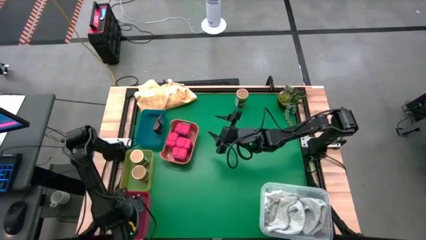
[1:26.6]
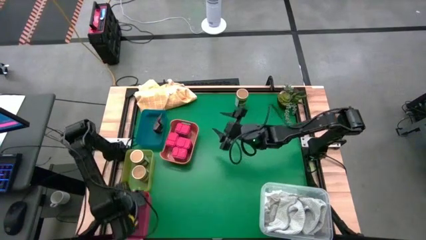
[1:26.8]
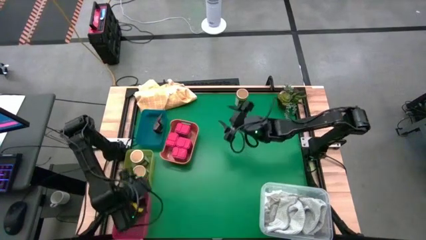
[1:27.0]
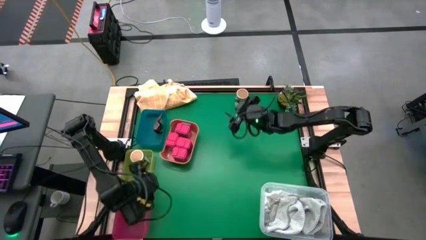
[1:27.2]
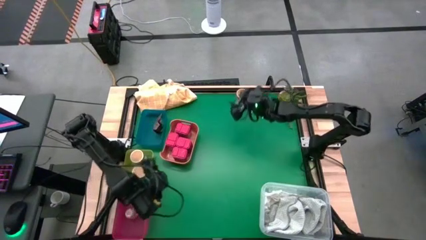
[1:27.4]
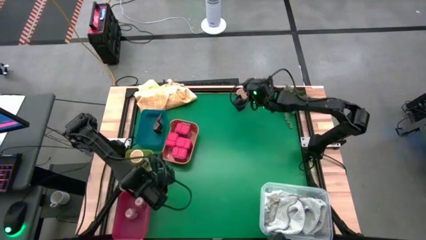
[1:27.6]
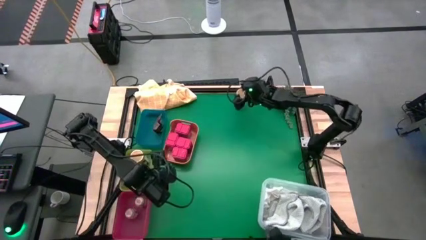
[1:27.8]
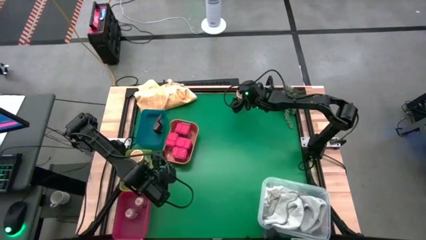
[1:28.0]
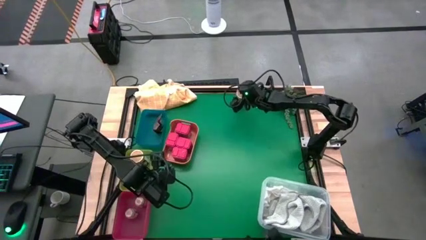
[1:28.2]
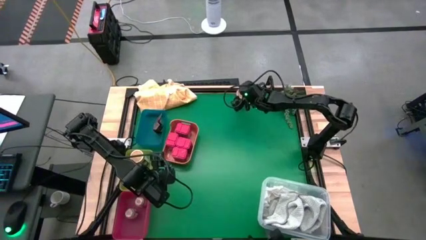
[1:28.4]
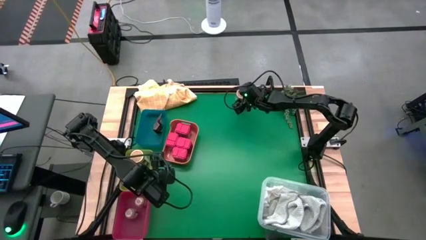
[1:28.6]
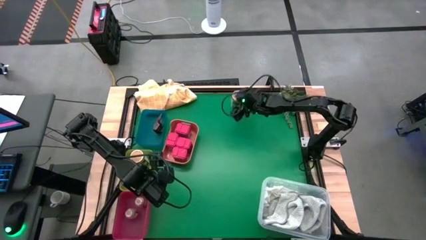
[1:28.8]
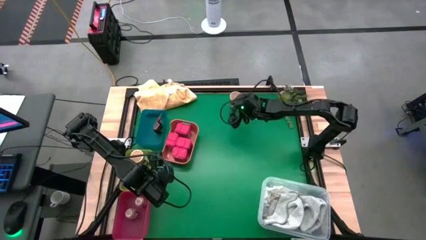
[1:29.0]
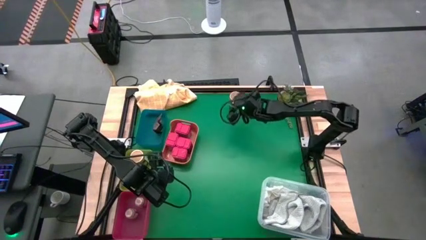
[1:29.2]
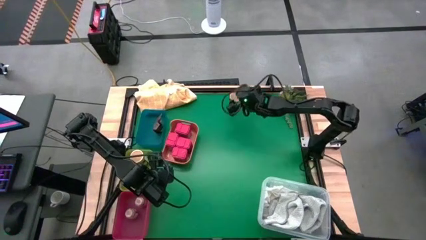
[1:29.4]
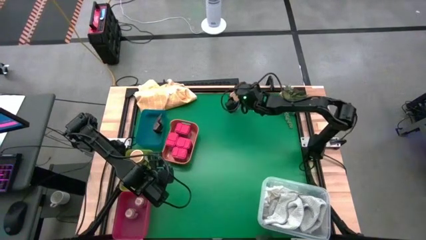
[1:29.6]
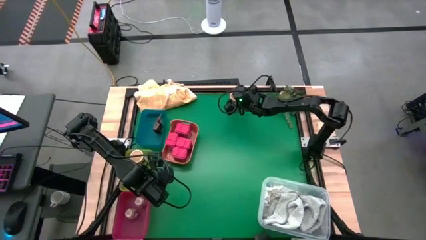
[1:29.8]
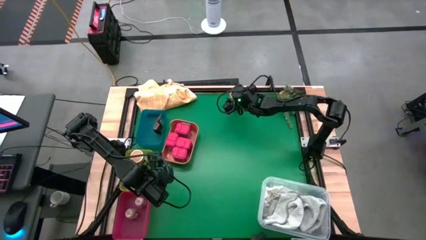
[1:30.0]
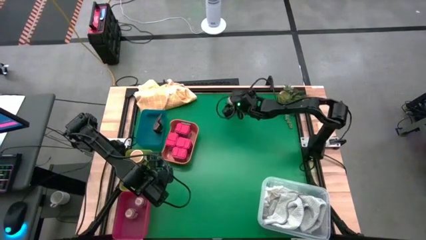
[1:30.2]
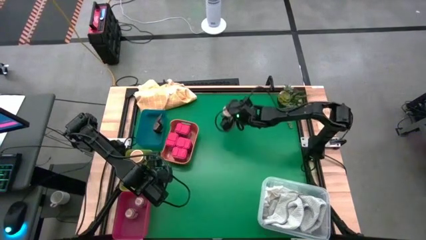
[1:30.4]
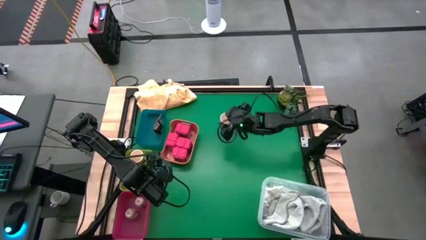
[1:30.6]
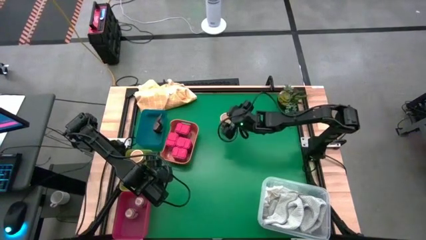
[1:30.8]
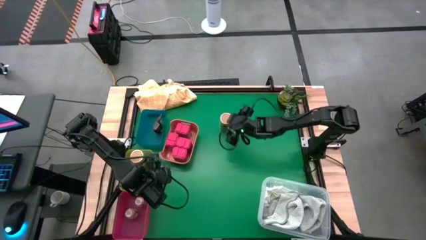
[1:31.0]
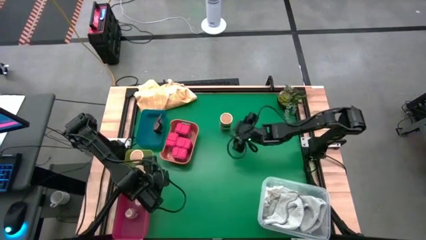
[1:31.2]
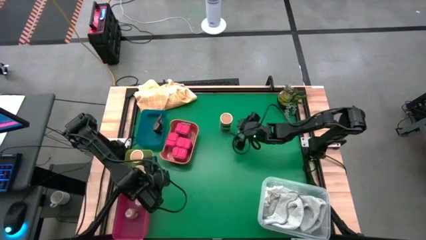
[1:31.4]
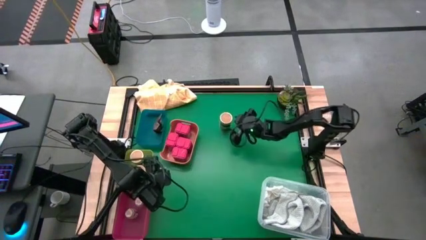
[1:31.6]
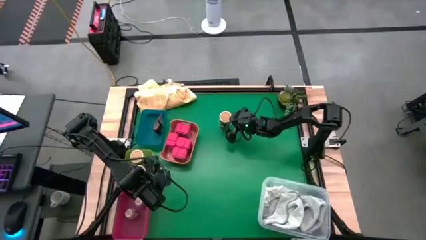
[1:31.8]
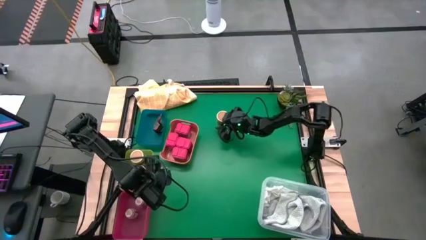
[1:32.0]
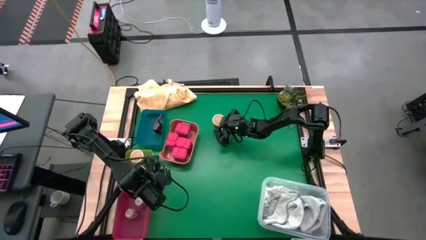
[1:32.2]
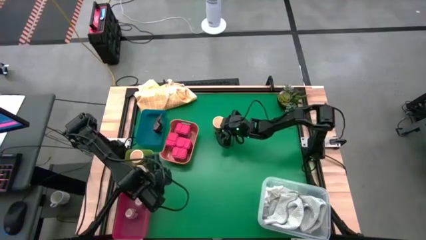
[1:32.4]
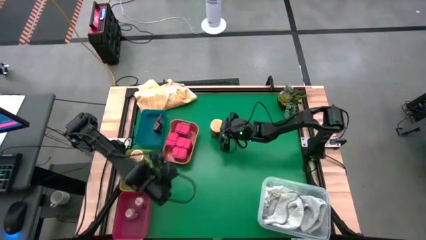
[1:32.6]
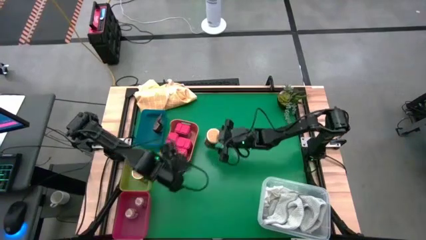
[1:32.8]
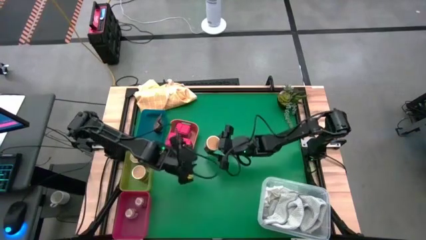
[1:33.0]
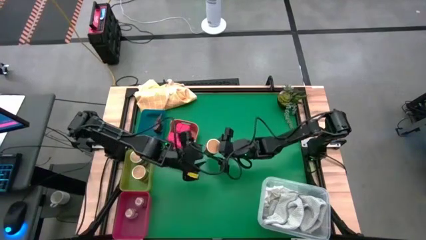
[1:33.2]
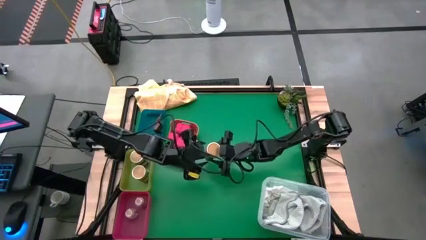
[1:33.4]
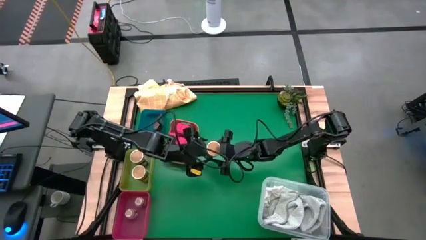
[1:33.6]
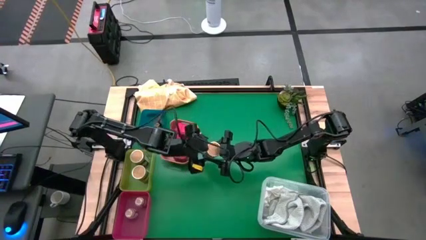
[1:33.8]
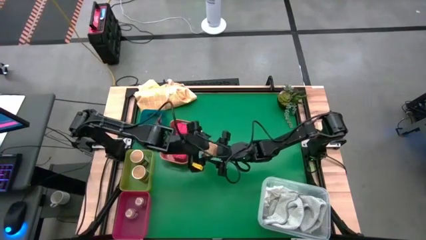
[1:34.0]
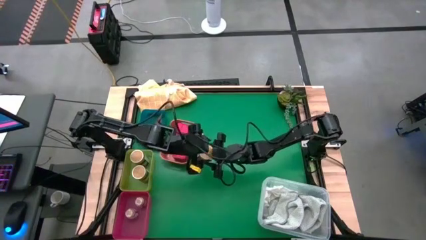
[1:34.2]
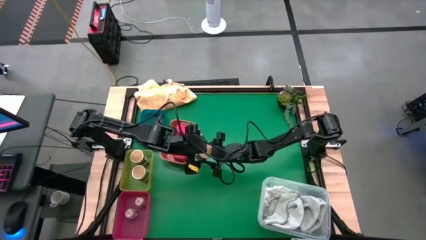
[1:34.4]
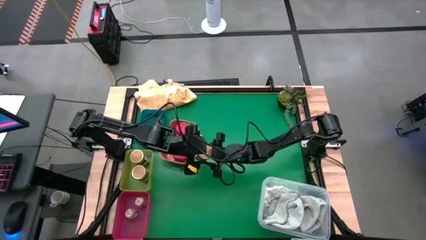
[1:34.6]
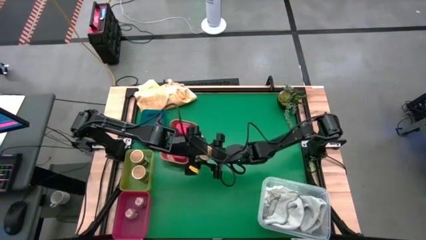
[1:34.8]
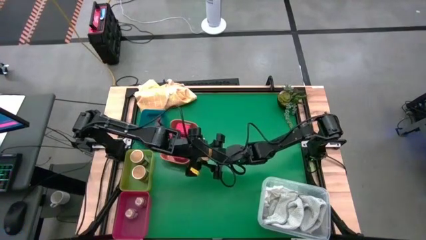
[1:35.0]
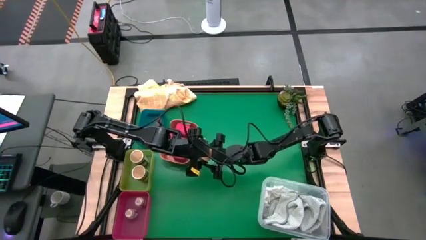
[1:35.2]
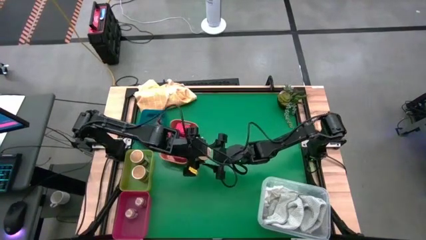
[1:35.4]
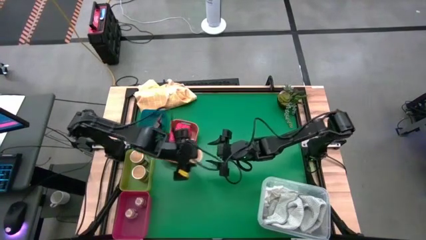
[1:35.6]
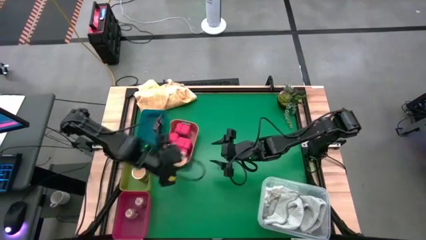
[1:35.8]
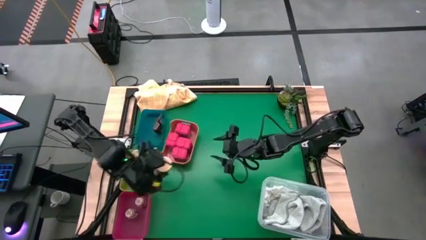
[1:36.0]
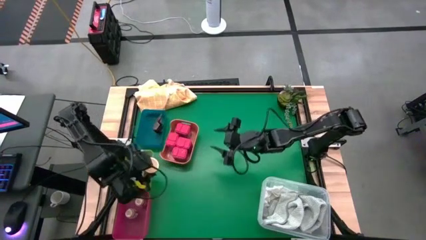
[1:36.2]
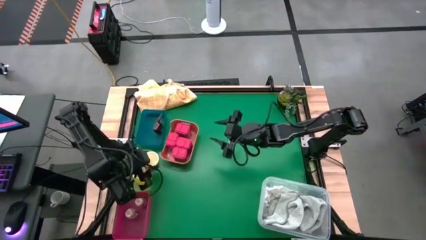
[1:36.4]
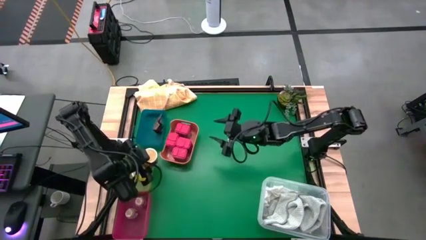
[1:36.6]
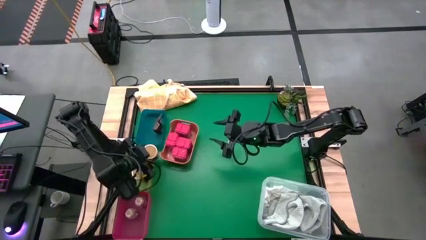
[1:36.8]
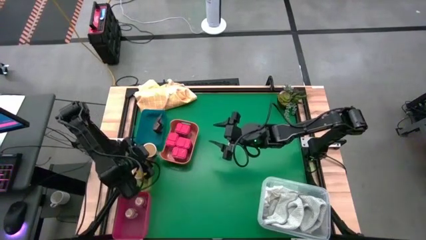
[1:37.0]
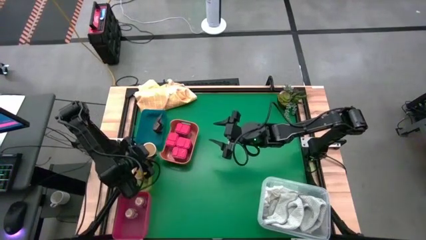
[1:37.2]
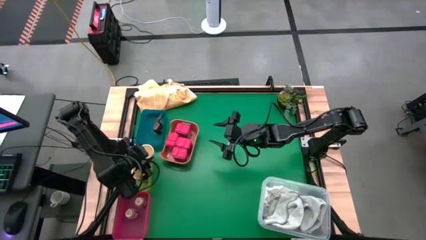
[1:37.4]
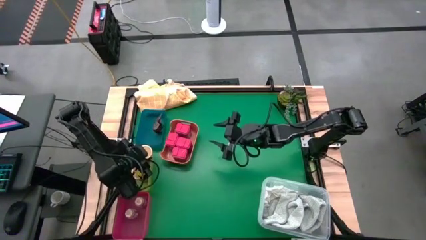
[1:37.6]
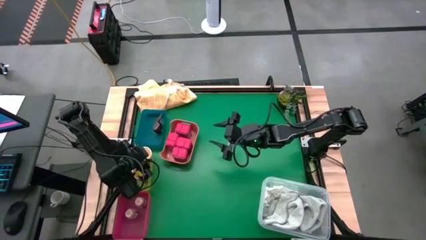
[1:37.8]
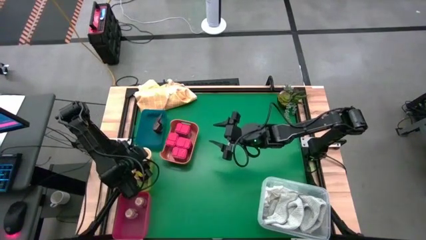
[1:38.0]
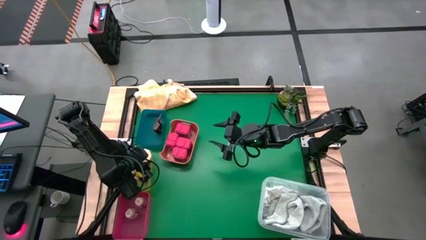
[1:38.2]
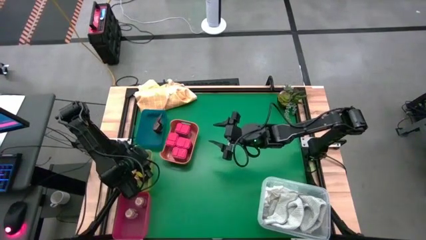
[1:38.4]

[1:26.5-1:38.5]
Task: Sort spices by type
Put the gold seasoning bottle into the yellow bin
